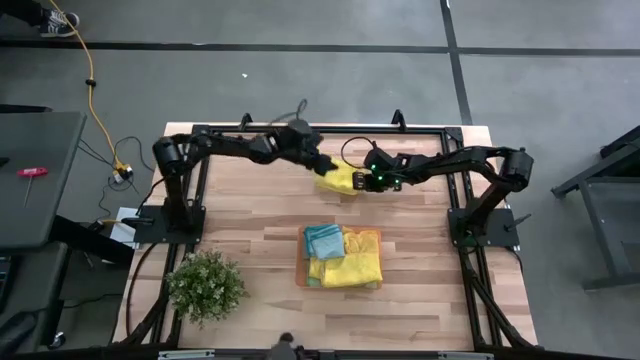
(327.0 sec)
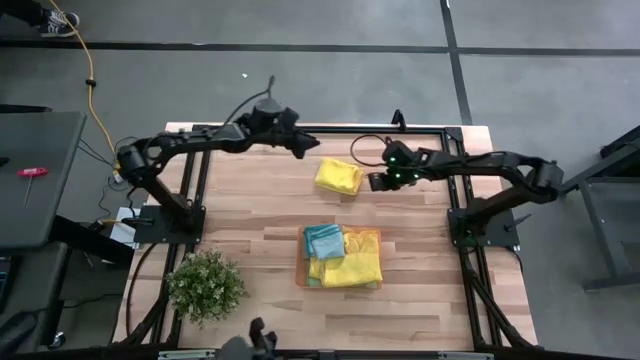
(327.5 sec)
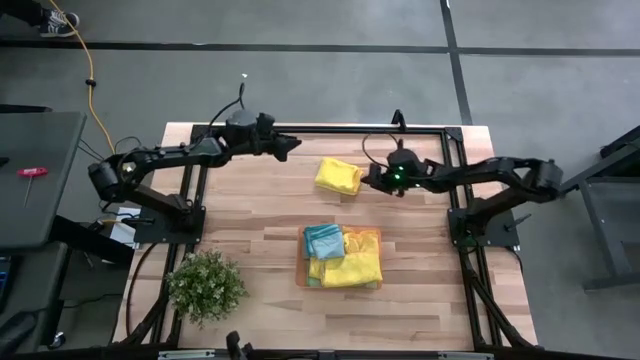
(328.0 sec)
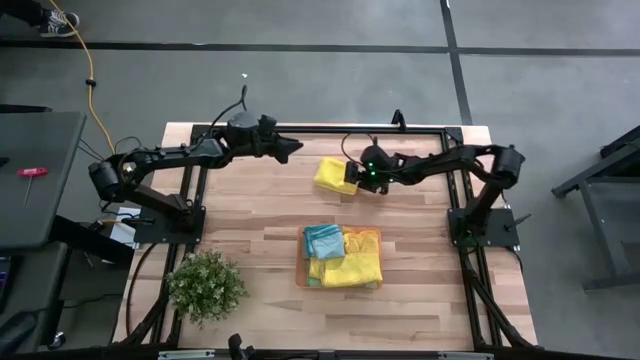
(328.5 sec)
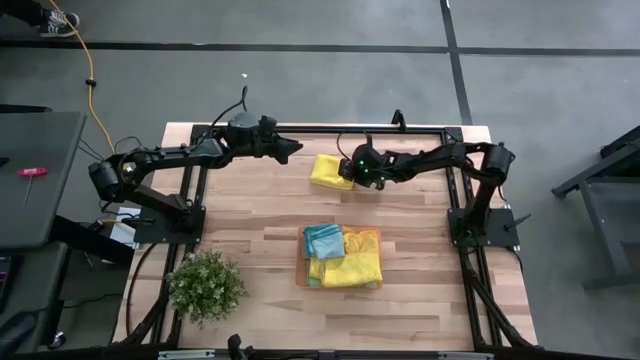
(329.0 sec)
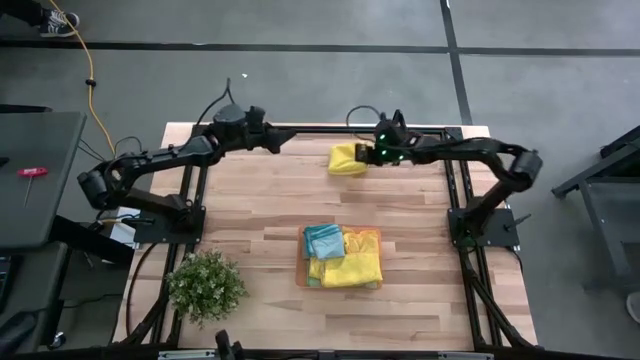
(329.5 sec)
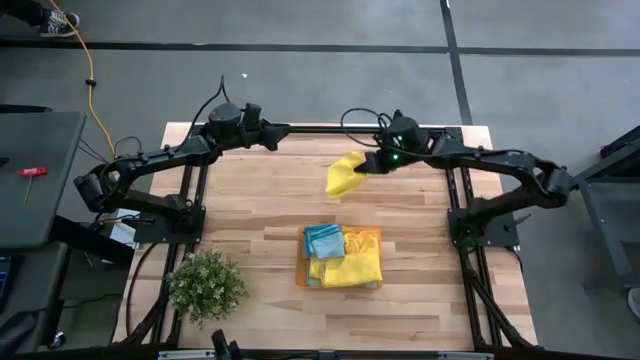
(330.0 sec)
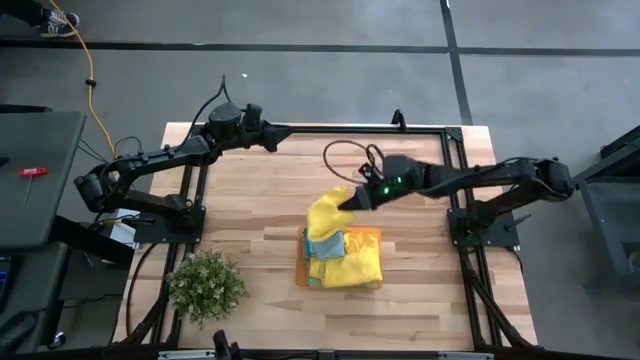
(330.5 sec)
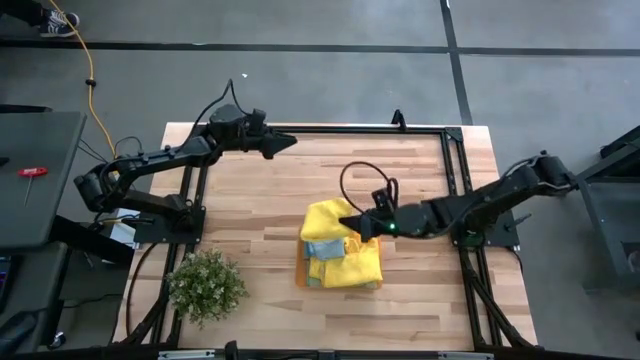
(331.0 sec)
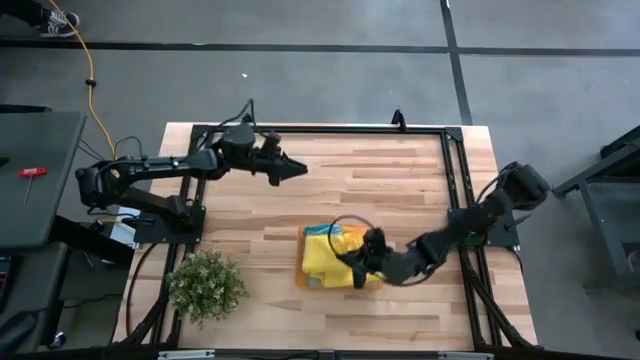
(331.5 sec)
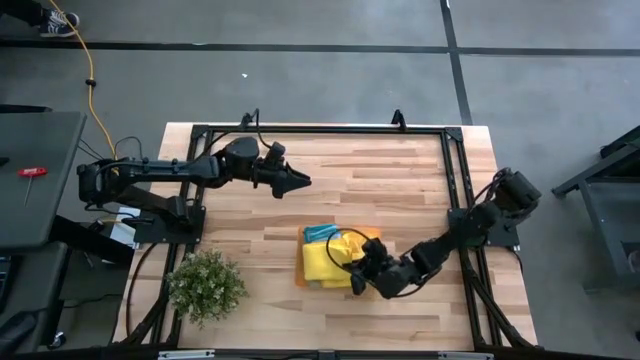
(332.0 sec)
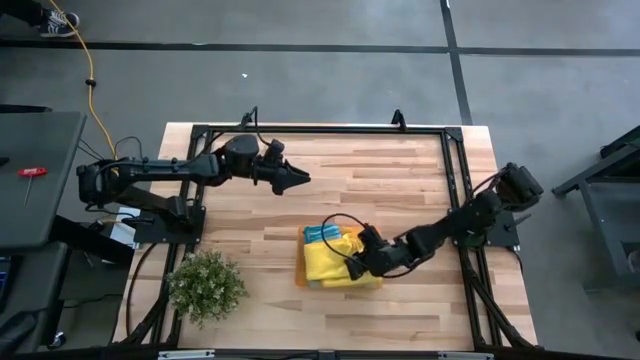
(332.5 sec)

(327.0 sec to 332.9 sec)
Task: Fold microfiber towels
Put the yellow microfiber towel into the orange bin

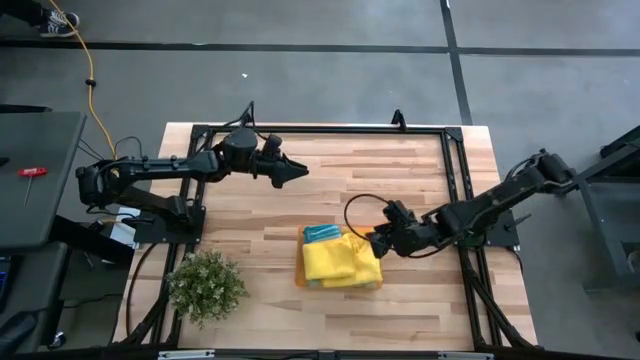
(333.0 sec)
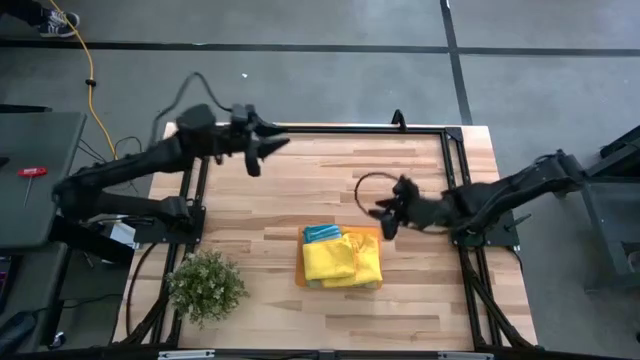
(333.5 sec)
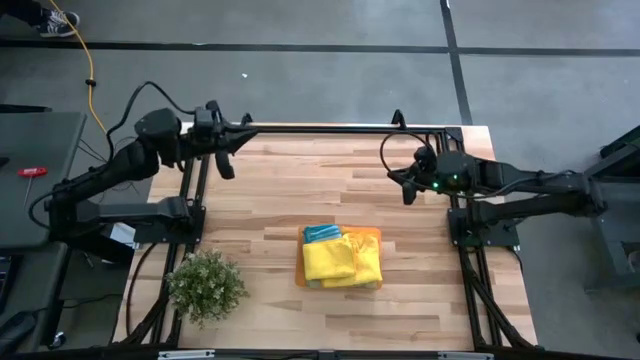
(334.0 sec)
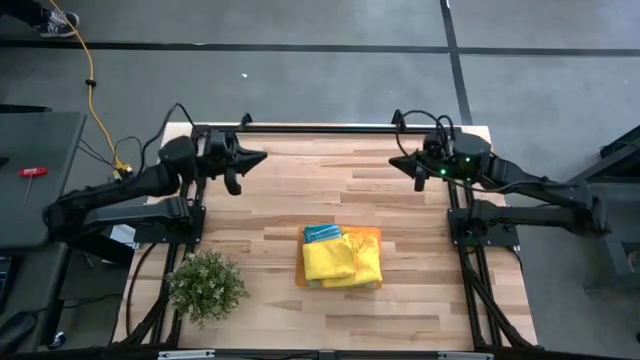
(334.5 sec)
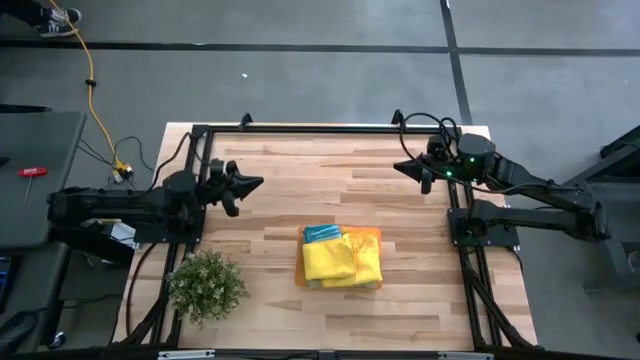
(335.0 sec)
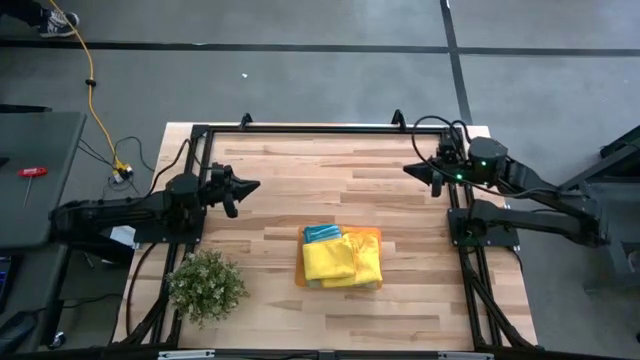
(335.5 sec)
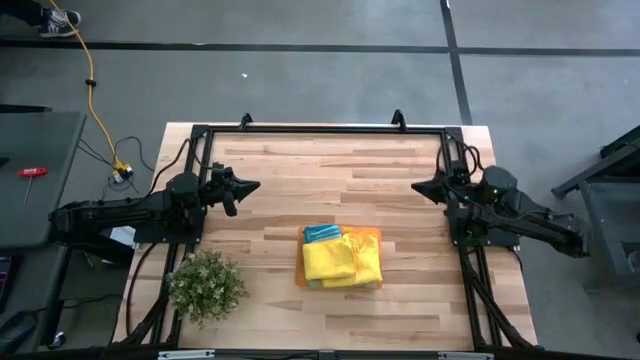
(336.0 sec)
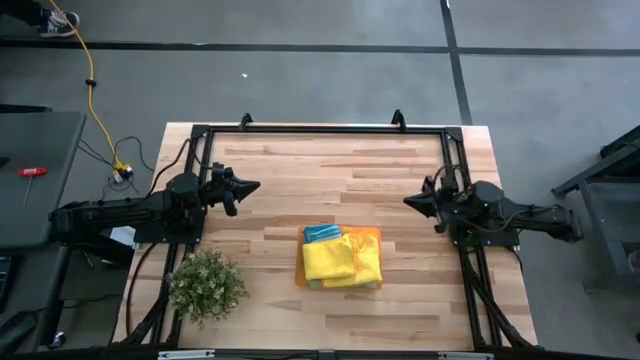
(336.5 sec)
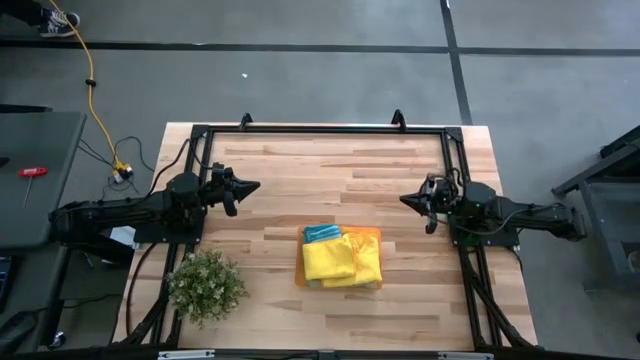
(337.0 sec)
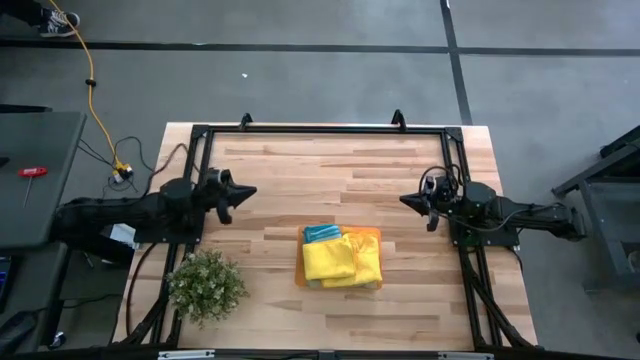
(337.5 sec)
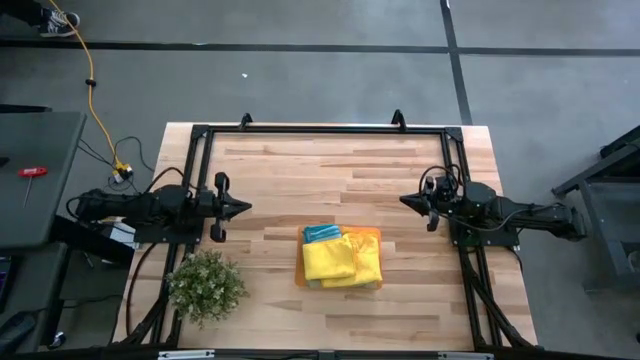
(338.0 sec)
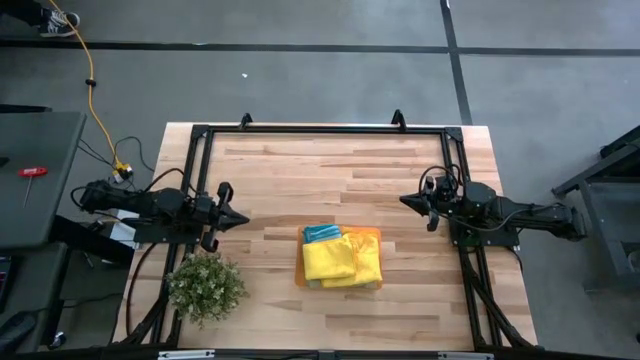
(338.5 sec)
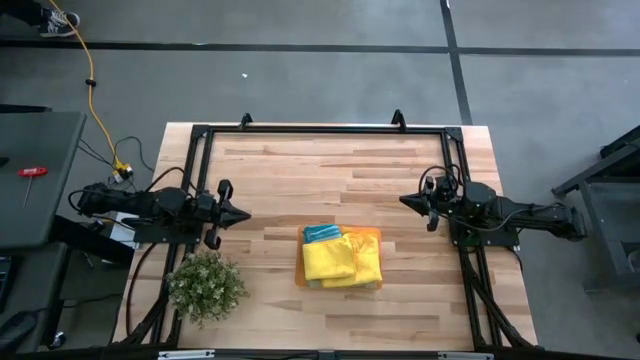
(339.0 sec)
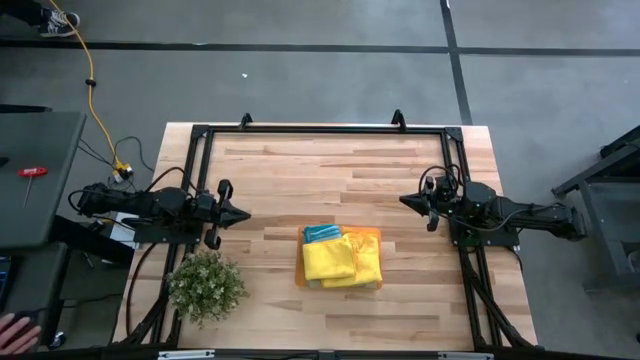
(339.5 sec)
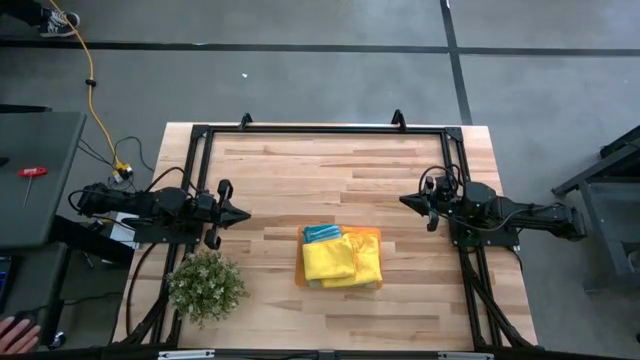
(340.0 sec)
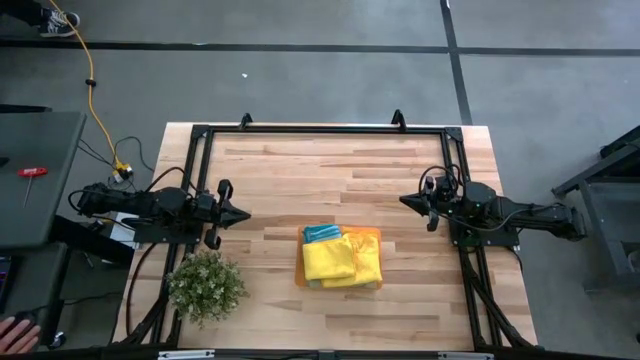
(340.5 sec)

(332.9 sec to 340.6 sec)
Return to Home Position

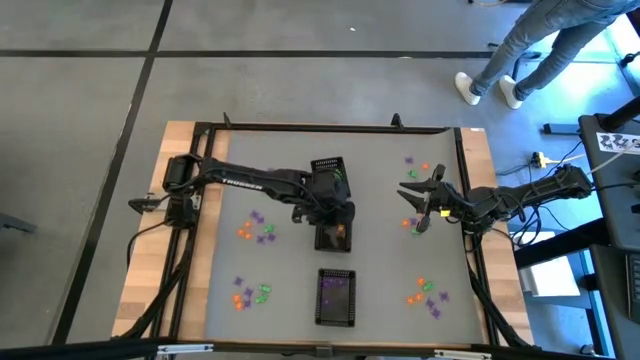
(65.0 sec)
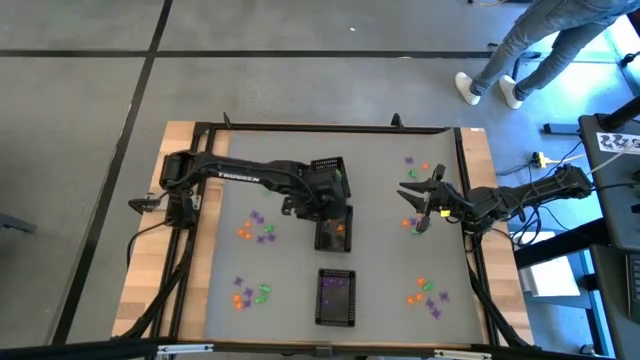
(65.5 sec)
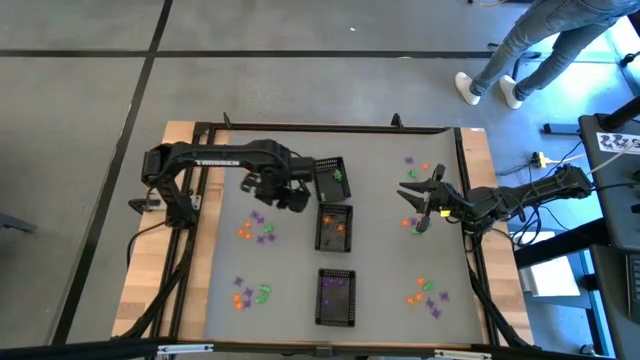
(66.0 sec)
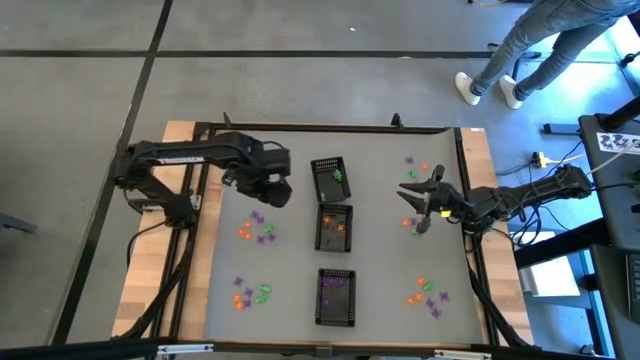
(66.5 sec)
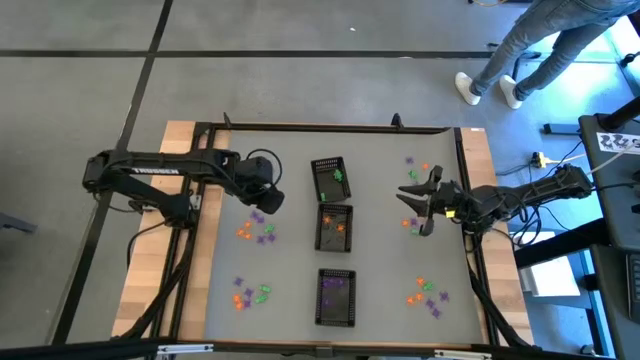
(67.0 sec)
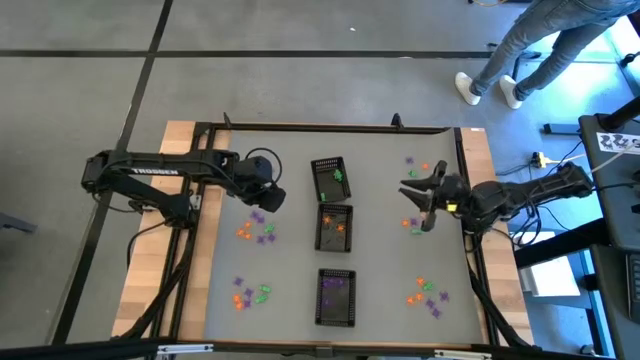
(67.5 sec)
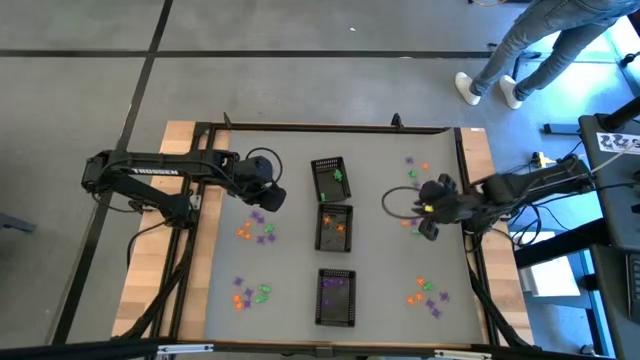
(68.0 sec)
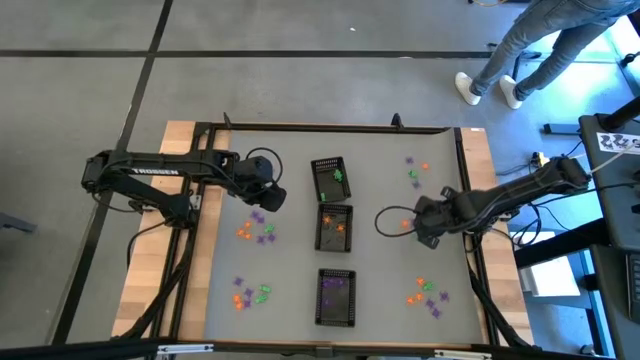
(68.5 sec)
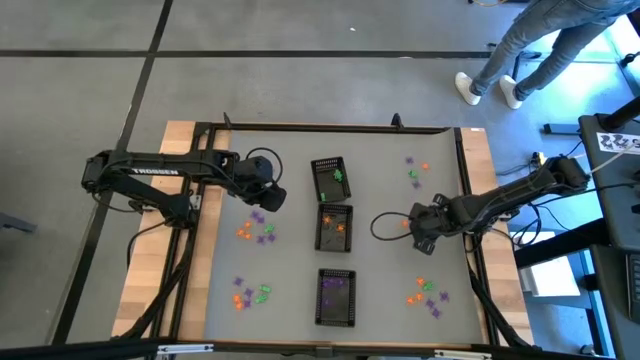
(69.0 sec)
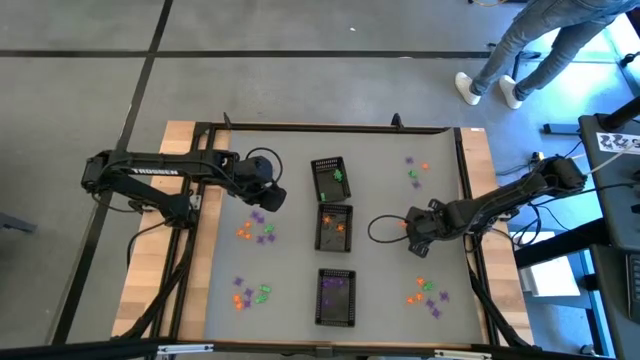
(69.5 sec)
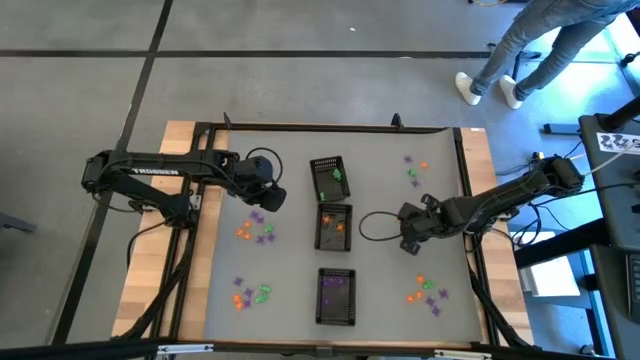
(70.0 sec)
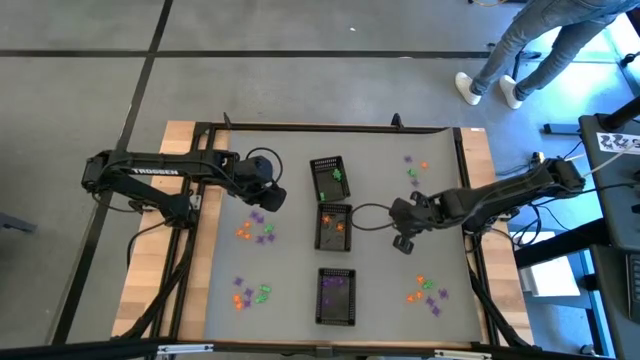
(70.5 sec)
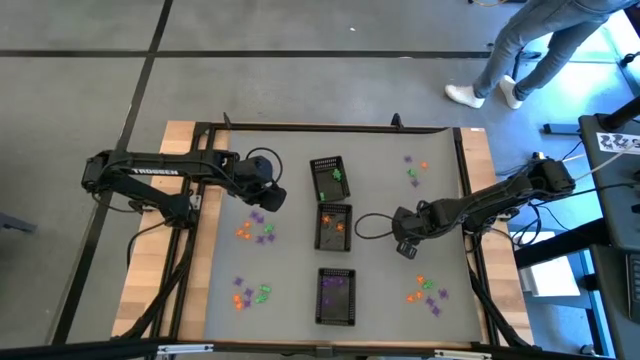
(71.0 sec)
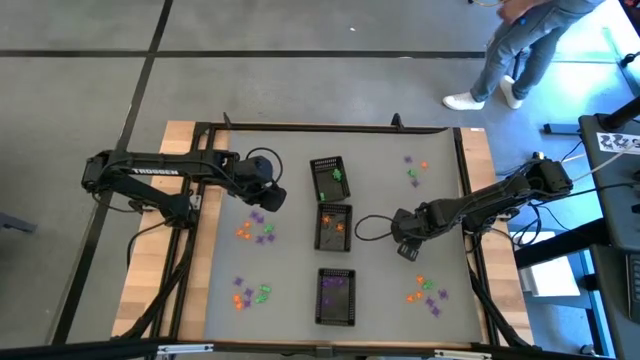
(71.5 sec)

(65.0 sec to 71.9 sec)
Task: Sort Halloween decoration
Put the green skeleton toy into the top black bin

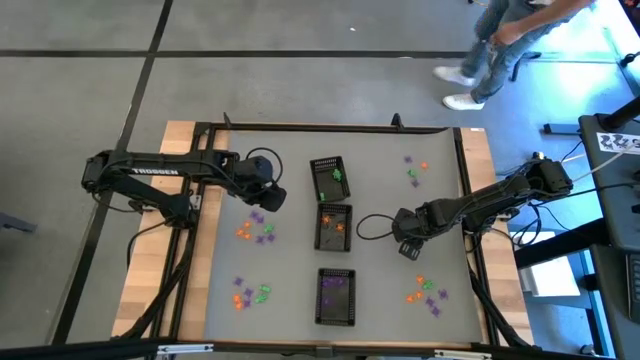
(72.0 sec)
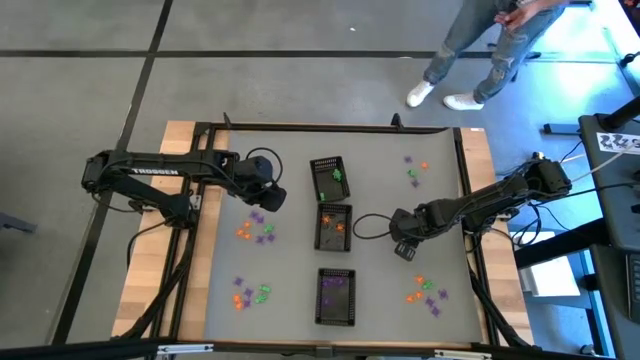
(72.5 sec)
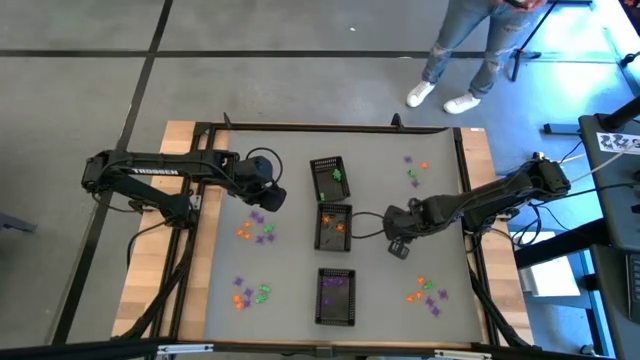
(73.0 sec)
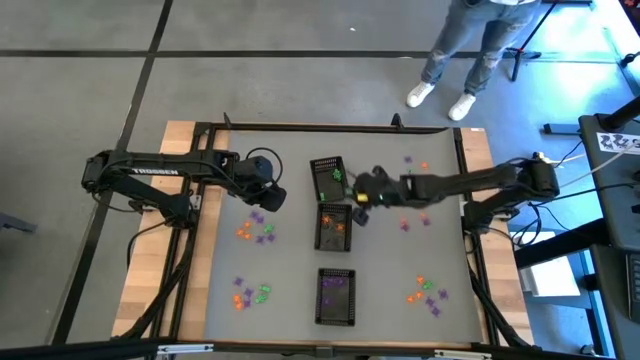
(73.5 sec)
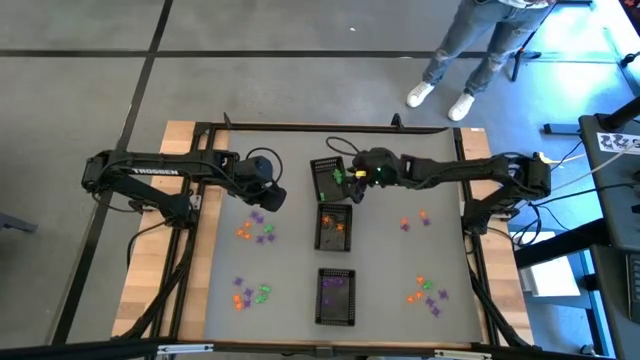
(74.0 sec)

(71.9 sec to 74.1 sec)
Put the green skeleton toy into the top black bin
